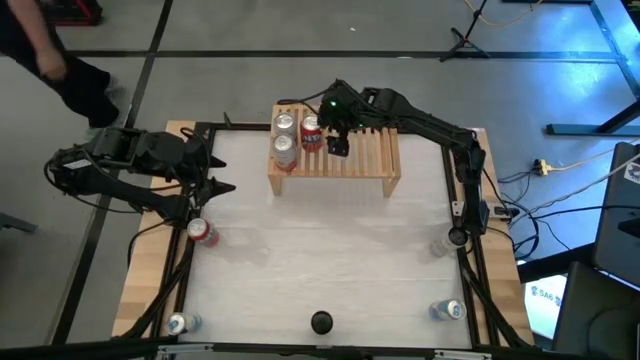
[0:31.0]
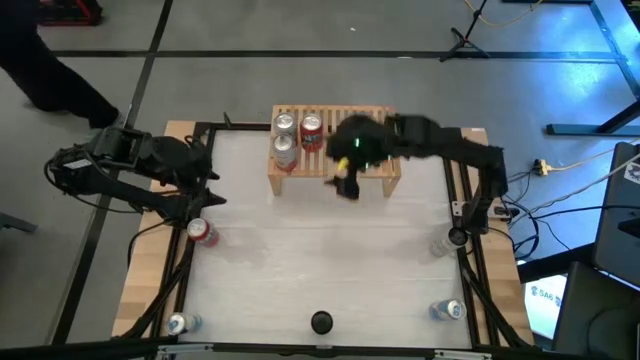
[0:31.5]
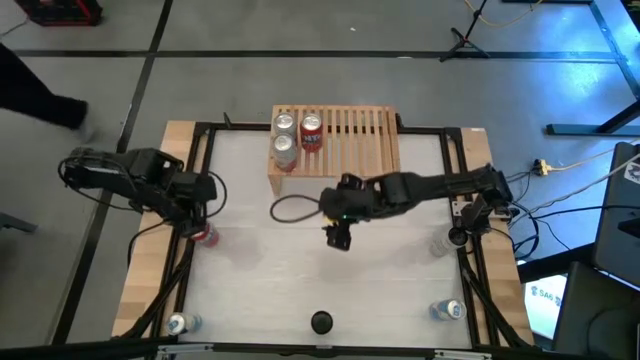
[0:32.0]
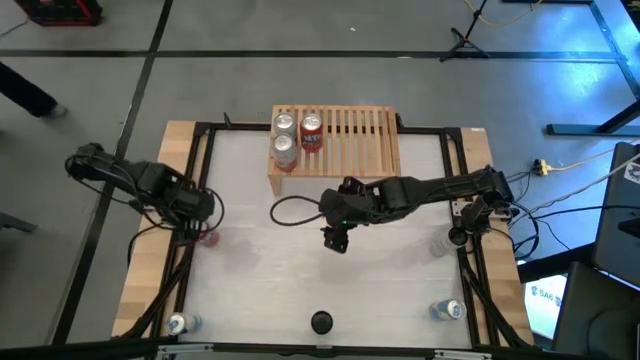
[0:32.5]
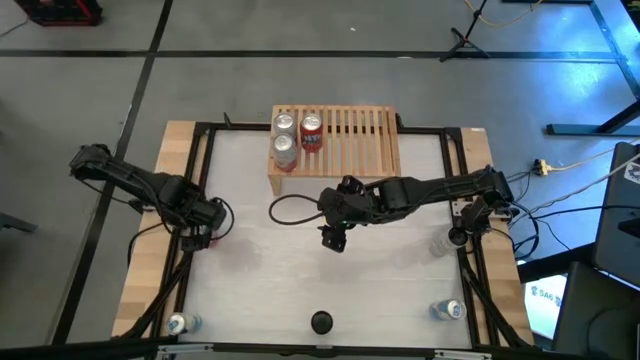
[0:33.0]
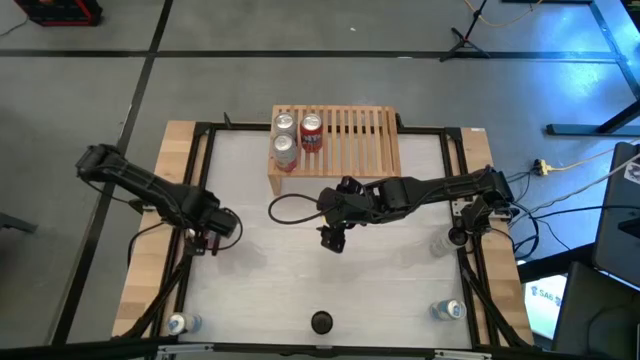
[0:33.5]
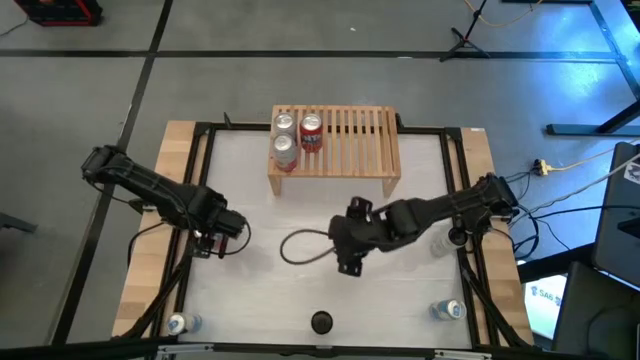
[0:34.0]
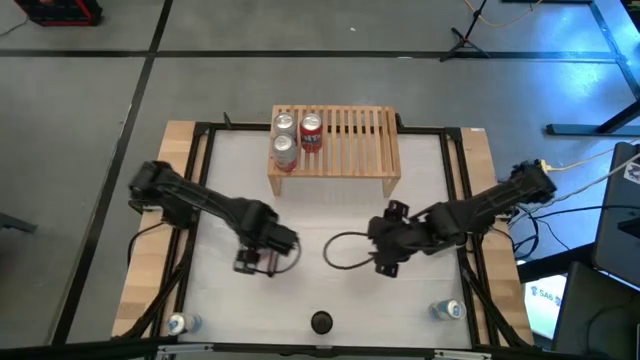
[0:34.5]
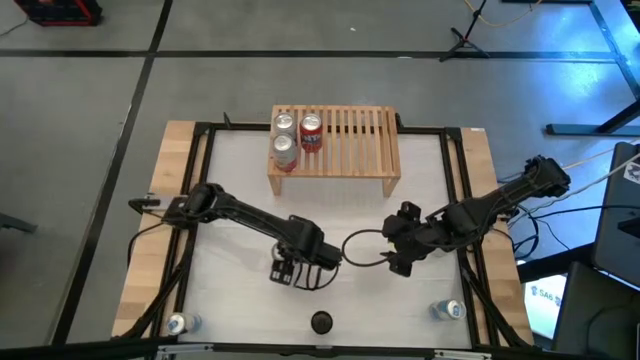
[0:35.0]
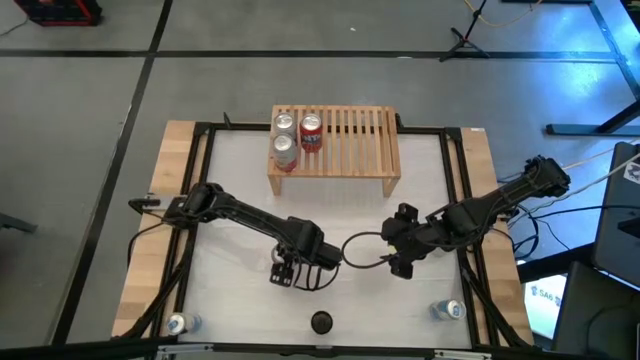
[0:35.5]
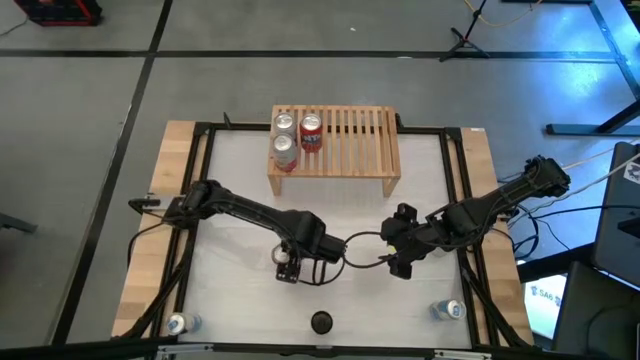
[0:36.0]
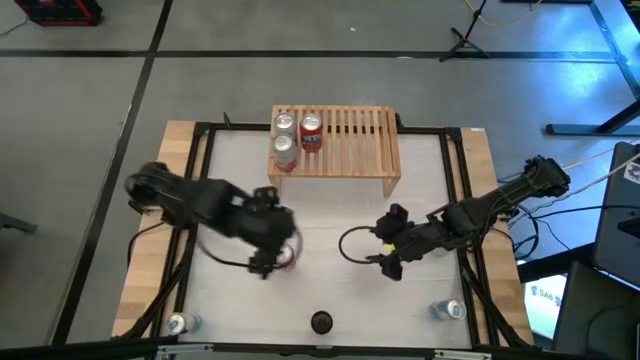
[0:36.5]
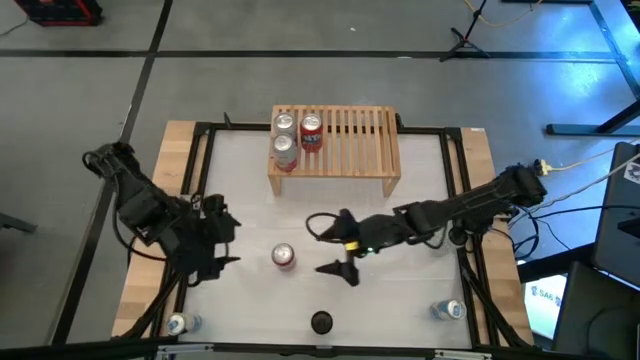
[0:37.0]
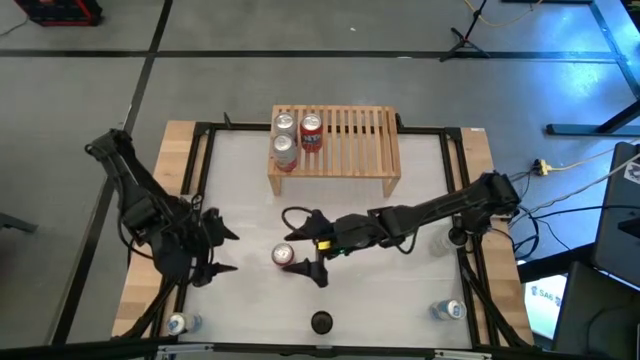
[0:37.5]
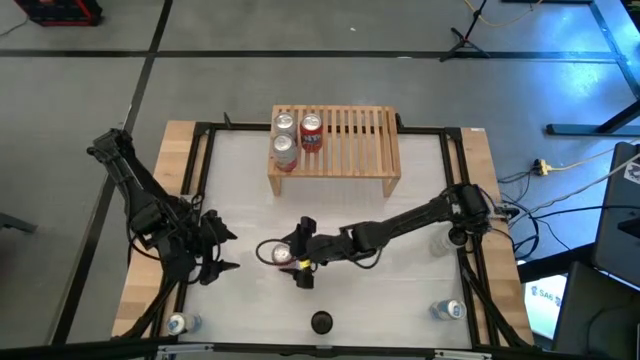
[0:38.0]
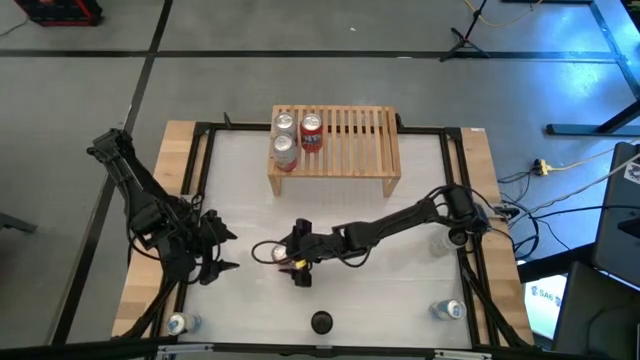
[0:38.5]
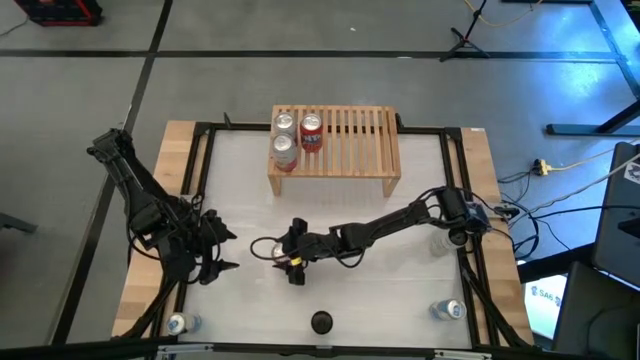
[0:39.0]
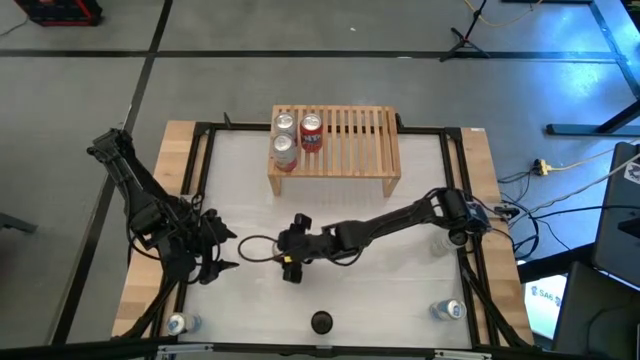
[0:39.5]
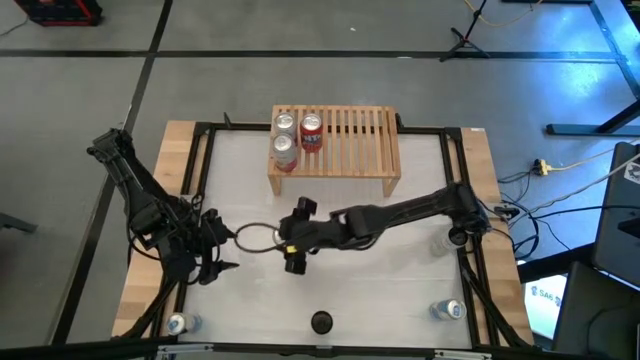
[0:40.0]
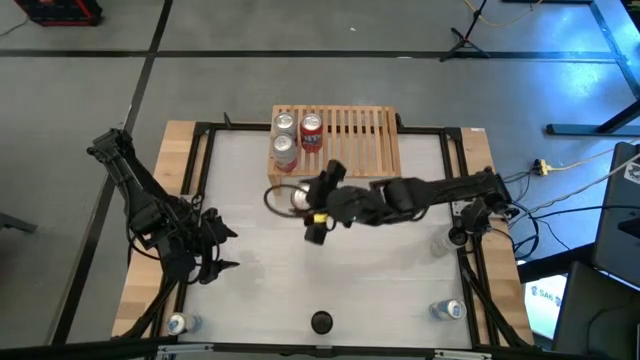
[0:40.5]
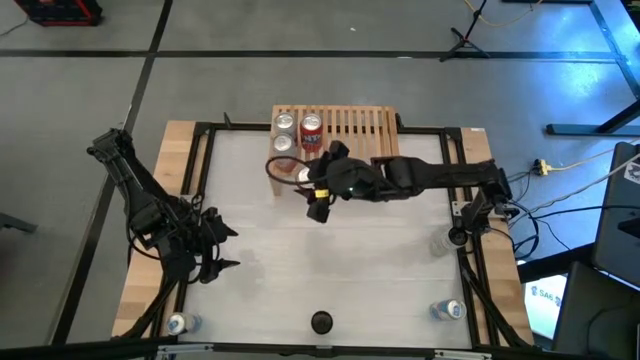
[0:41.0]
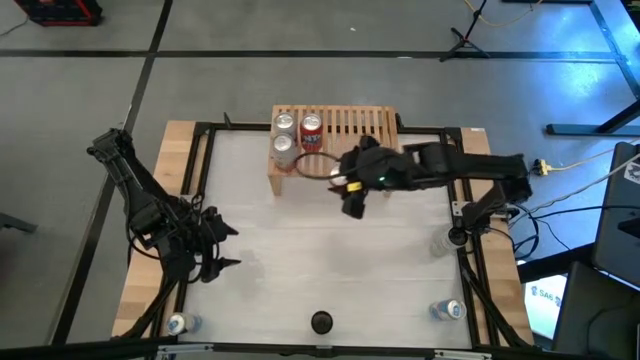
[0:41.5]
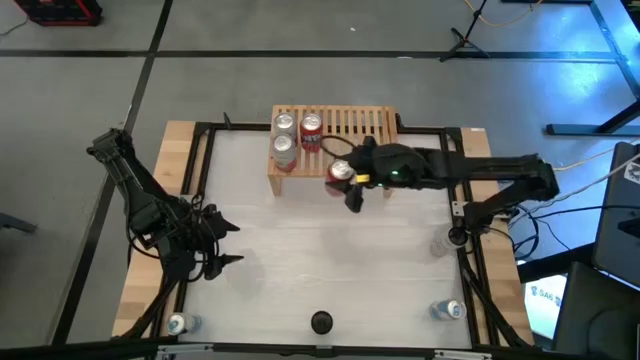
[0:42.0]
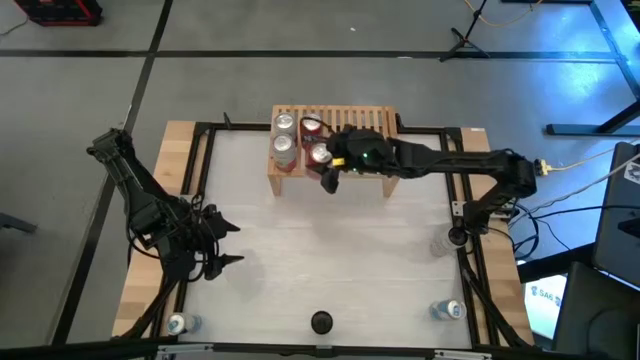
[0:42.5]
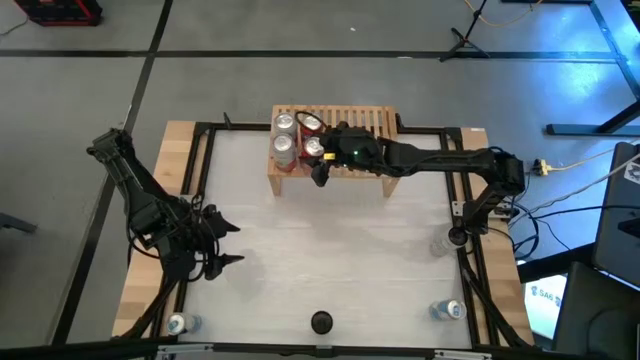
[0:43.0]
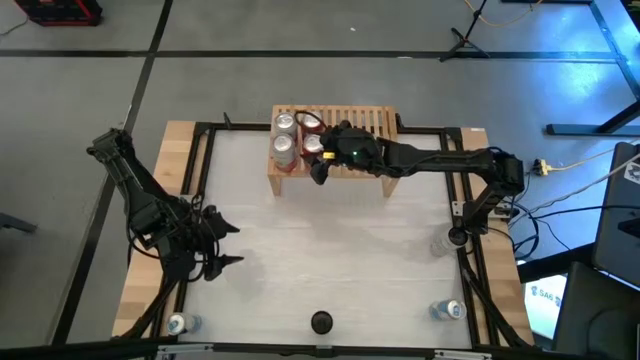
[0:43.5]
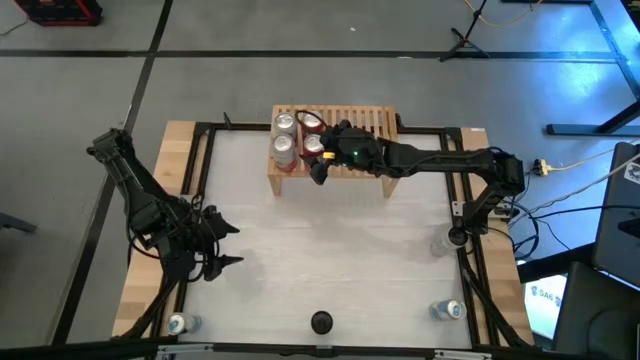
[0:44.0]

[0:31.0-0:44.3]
Task: Place canned beverage on shelf
Put the orange soda can on the shelf aligned with the other orange soda can

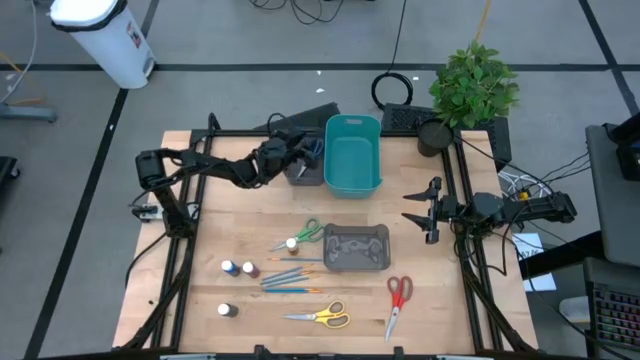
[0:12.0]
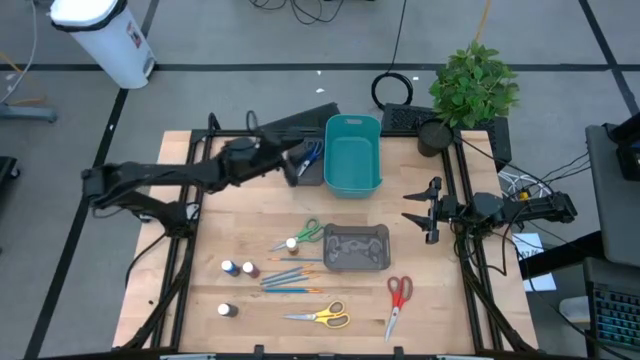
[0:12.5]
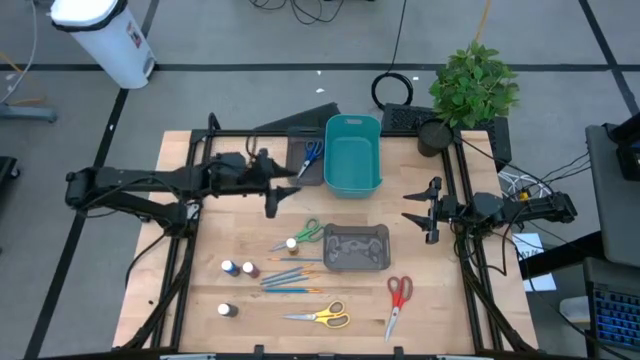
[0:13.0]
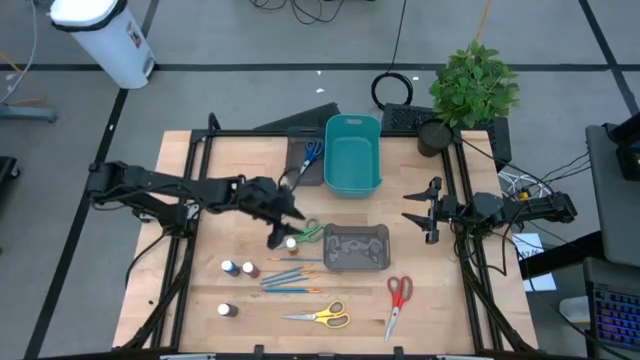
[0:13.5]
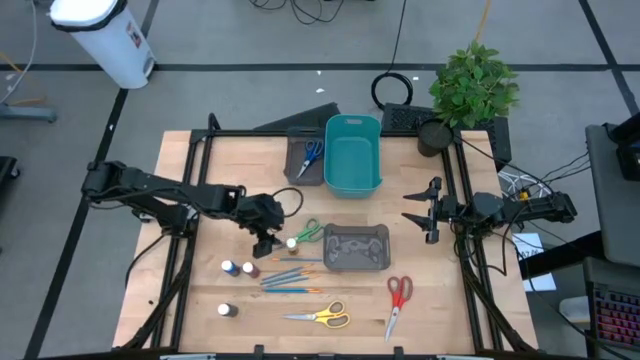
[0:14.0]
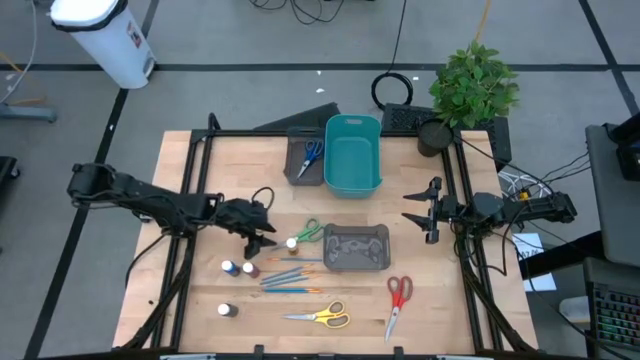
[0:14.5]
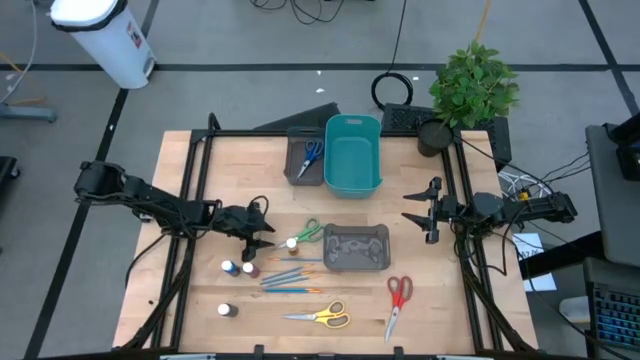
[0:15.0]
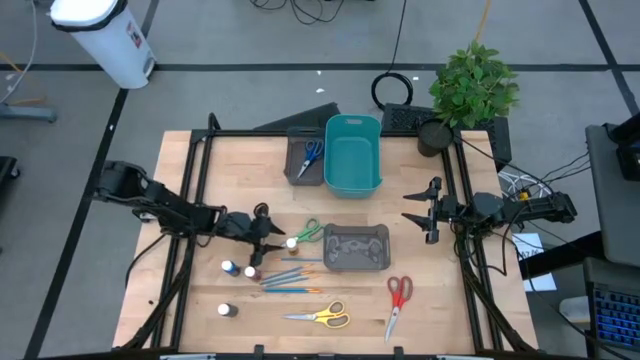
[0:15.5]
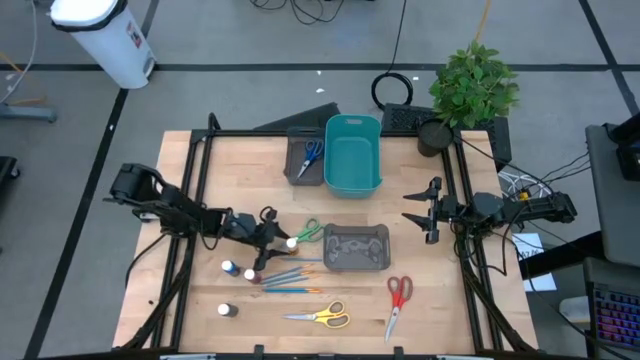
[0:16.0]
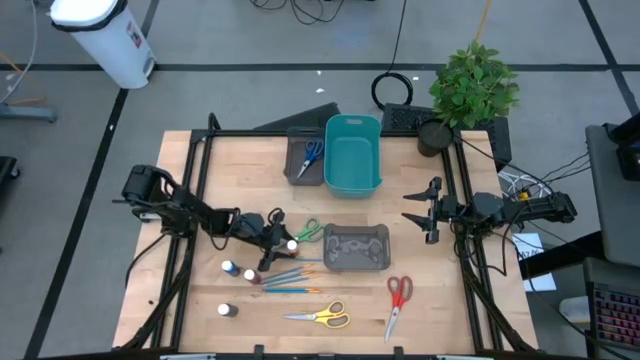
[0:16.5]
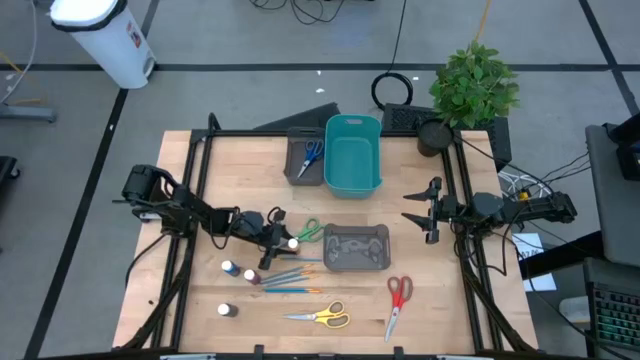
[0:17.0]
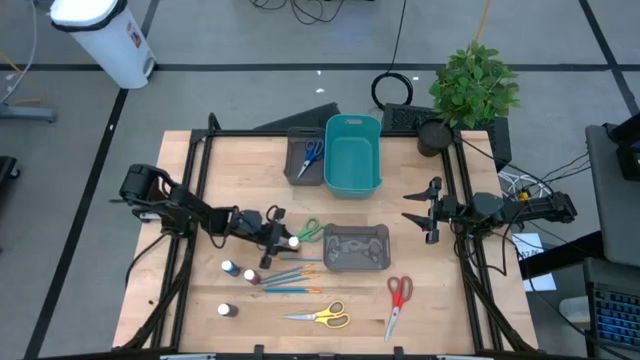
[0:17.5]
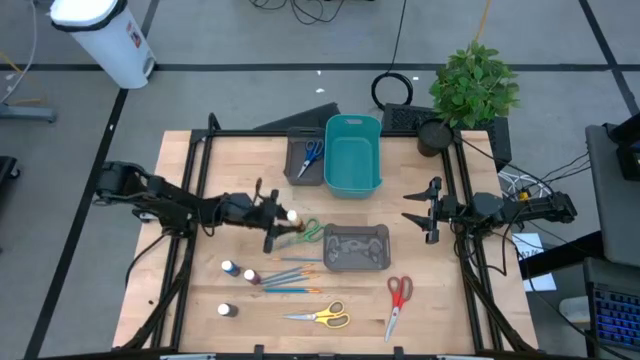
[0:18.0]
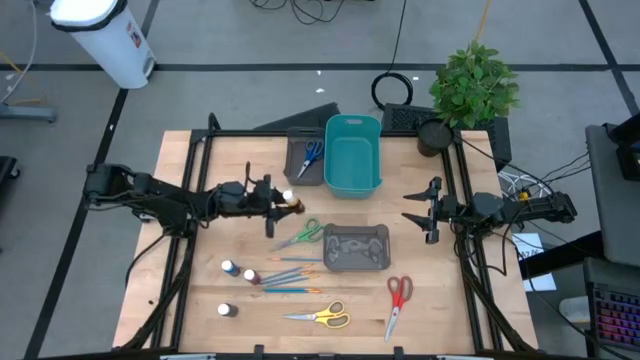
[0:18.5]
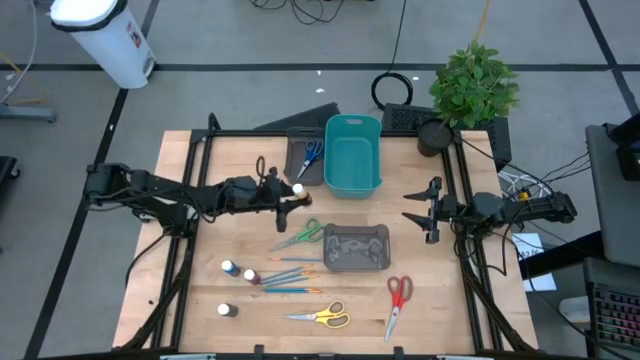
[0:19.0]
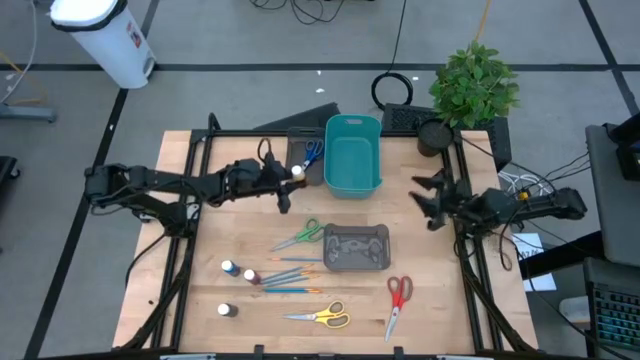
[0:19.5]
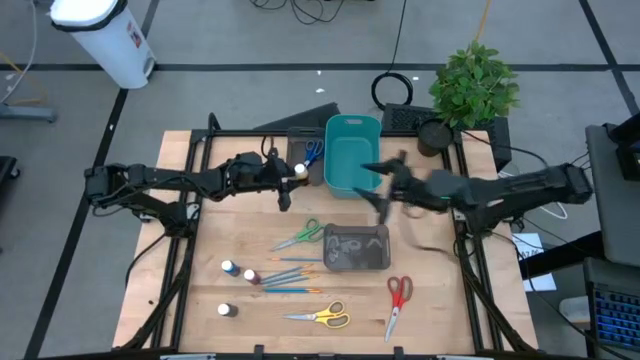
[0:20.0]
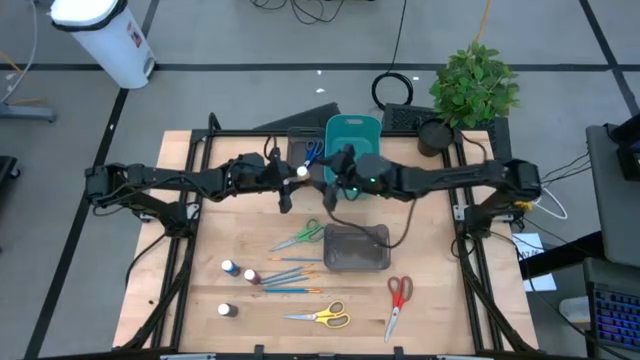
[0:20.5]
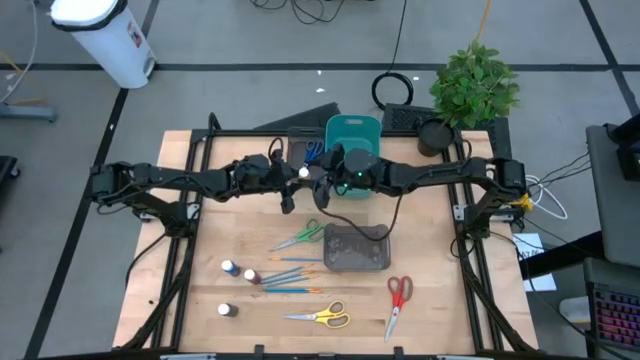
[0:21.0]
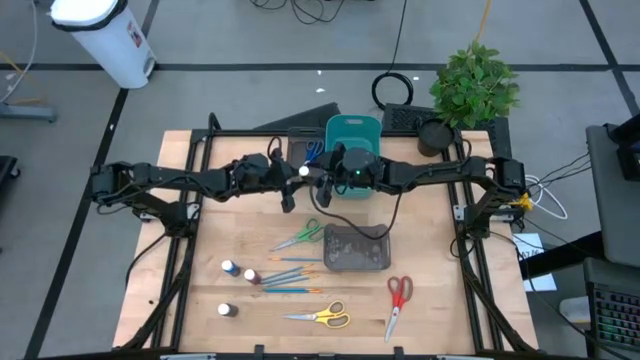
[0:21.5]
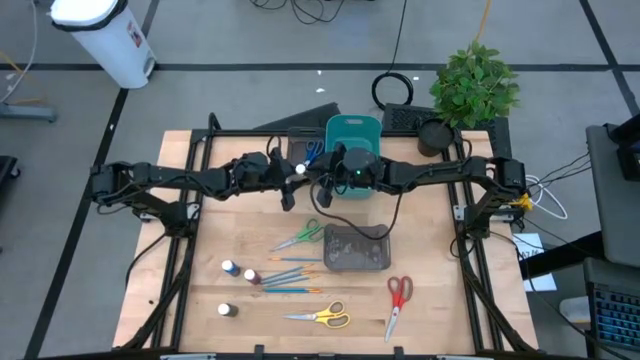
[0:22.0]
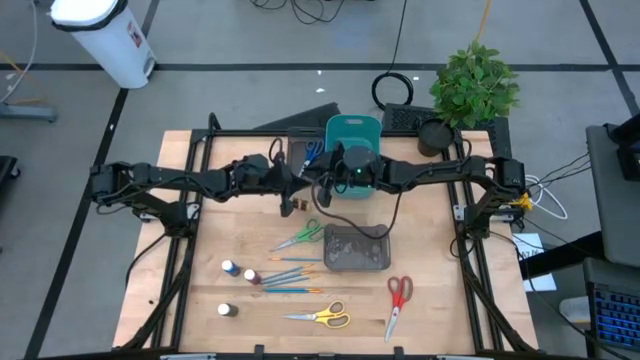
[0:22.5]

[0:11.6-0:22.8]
Task: Pick & Place Paint Supplies
Put the yellow paint bottle into the green bin
